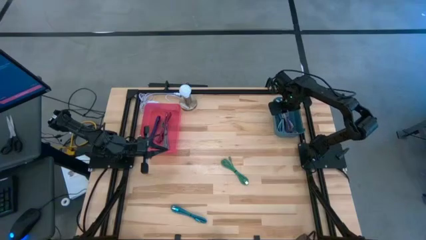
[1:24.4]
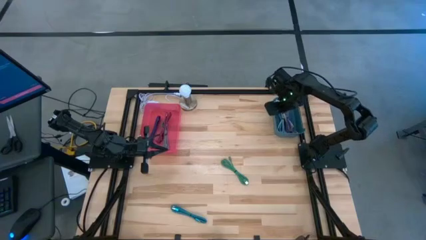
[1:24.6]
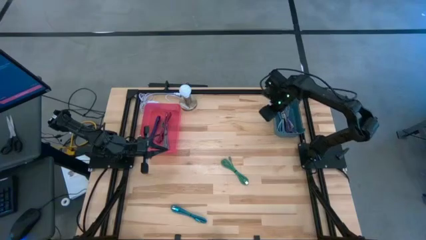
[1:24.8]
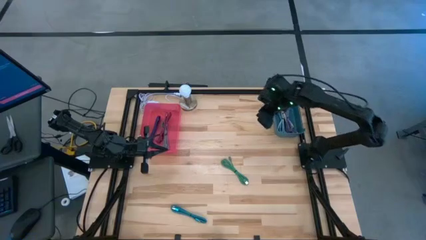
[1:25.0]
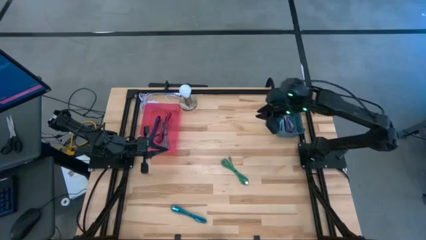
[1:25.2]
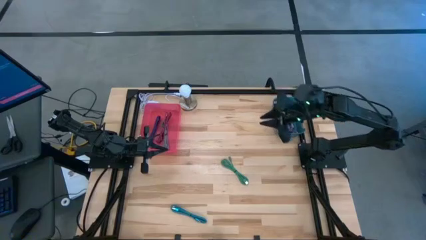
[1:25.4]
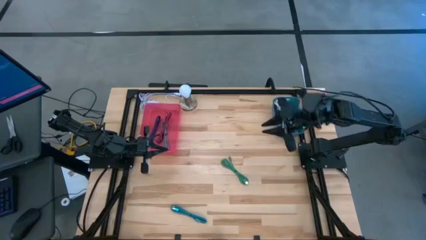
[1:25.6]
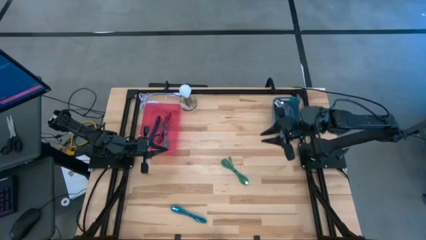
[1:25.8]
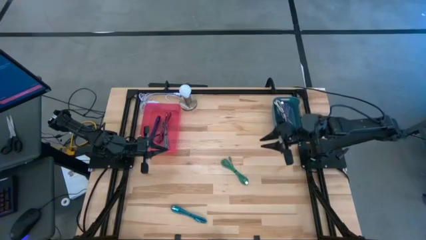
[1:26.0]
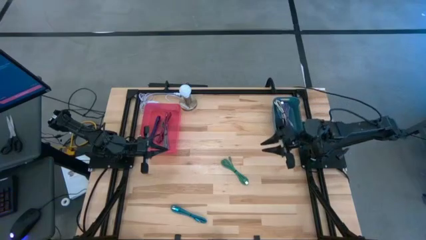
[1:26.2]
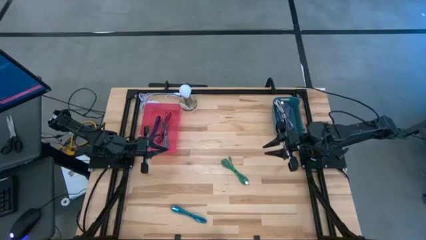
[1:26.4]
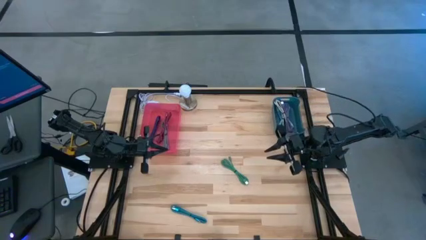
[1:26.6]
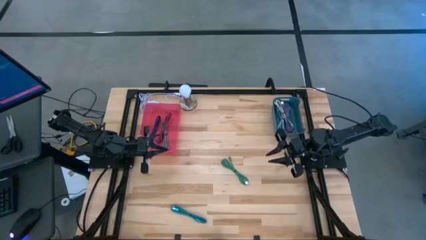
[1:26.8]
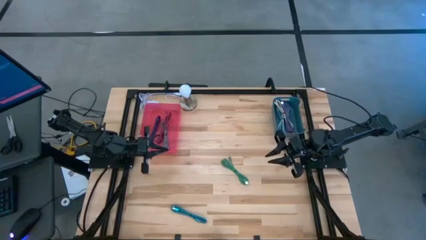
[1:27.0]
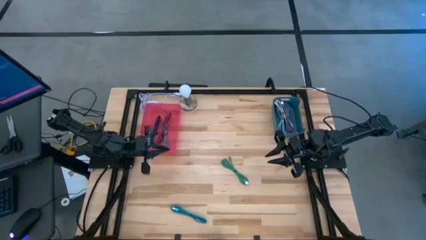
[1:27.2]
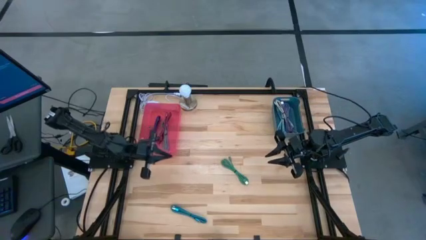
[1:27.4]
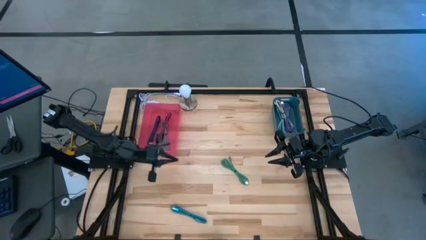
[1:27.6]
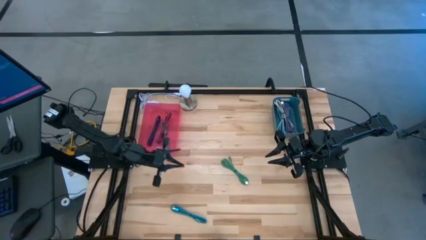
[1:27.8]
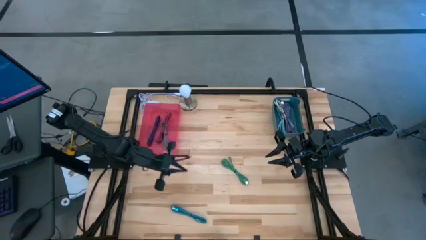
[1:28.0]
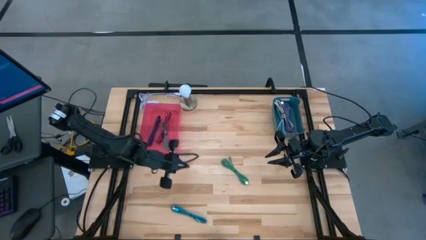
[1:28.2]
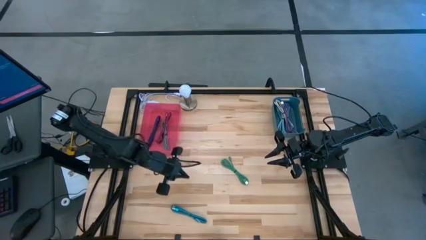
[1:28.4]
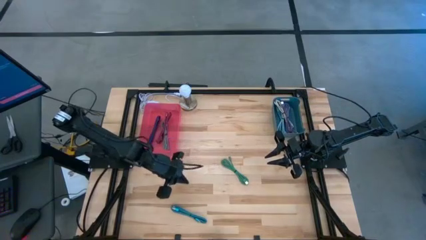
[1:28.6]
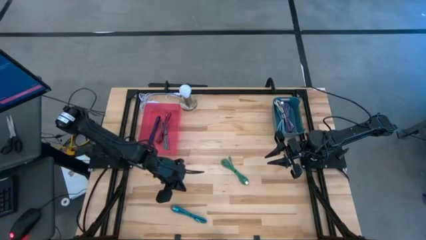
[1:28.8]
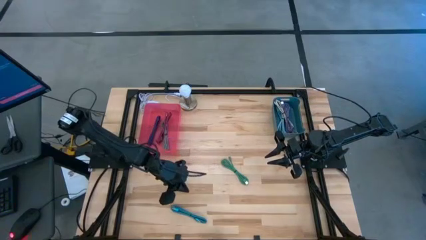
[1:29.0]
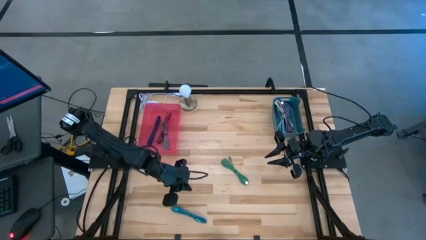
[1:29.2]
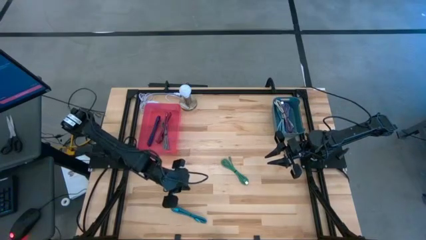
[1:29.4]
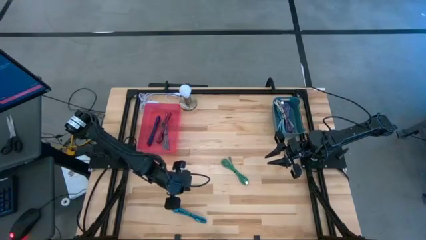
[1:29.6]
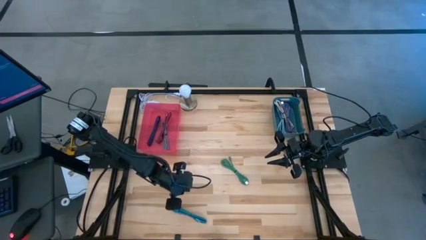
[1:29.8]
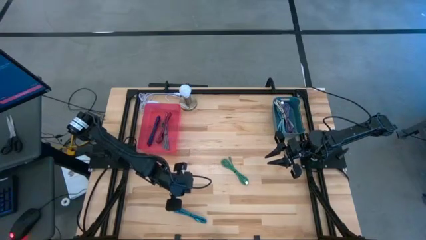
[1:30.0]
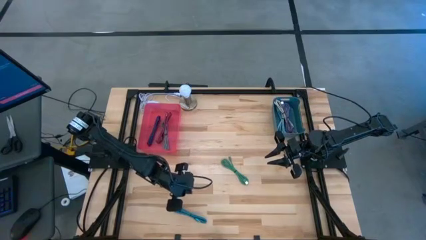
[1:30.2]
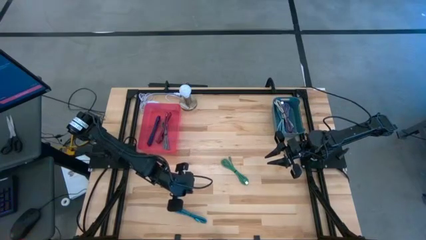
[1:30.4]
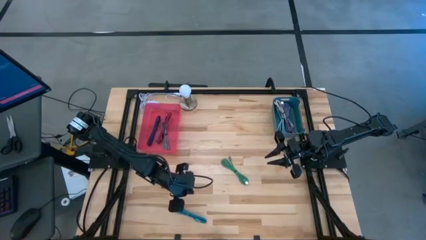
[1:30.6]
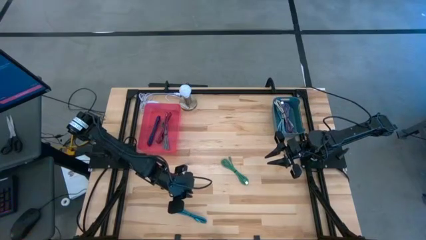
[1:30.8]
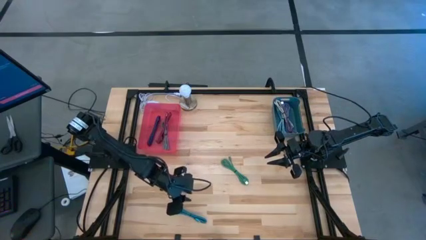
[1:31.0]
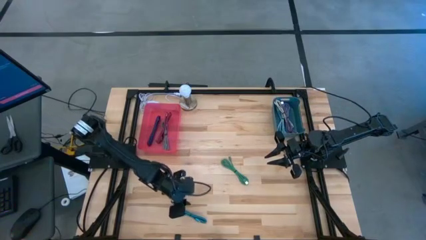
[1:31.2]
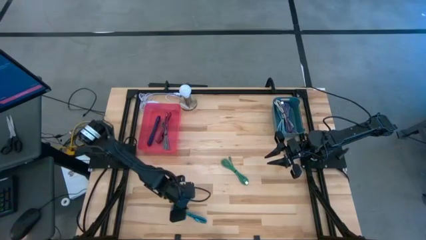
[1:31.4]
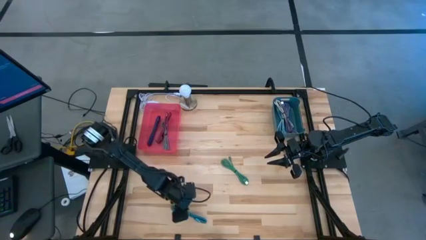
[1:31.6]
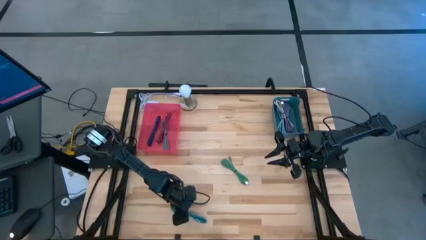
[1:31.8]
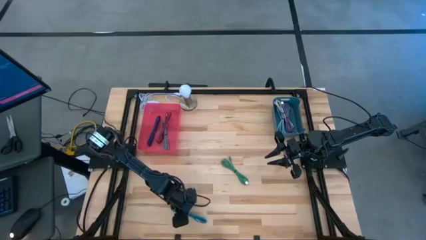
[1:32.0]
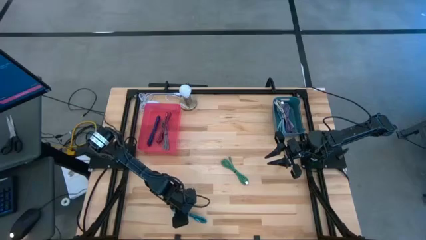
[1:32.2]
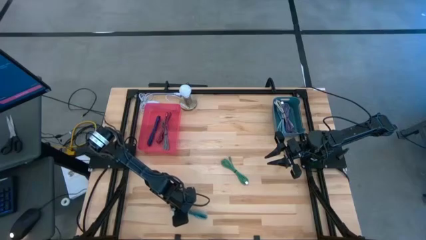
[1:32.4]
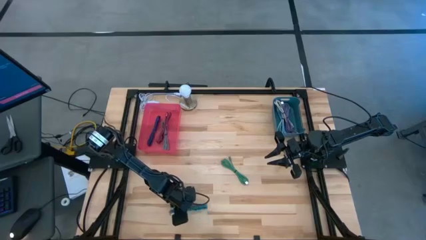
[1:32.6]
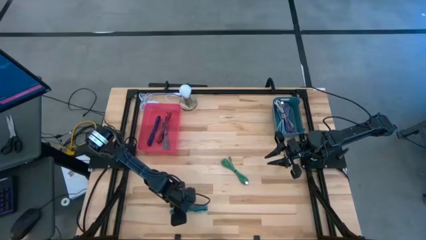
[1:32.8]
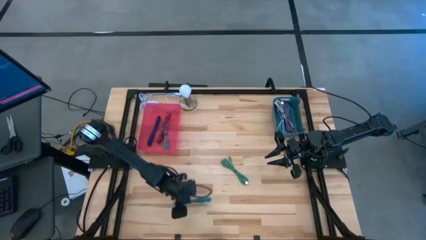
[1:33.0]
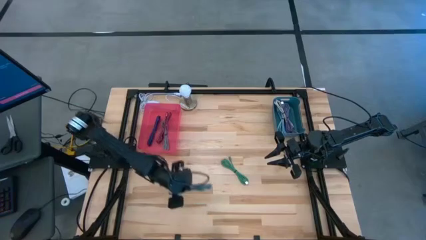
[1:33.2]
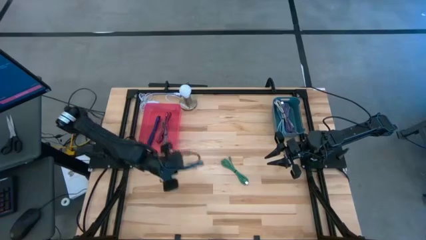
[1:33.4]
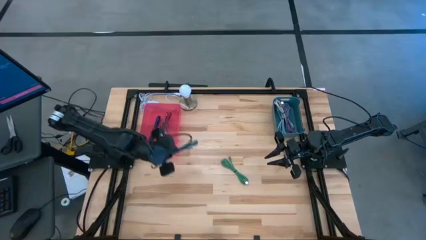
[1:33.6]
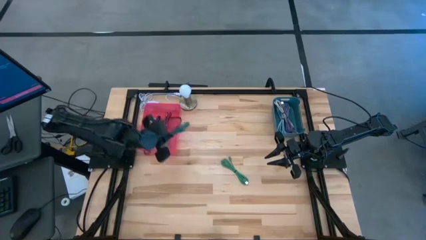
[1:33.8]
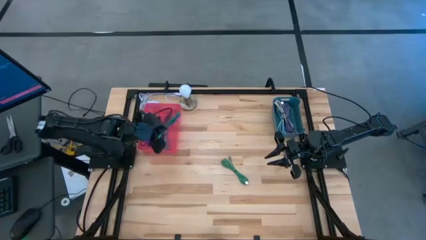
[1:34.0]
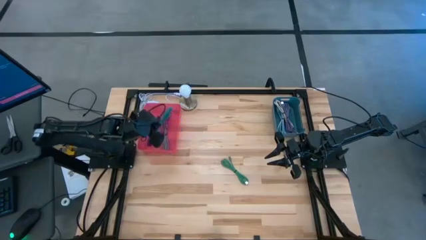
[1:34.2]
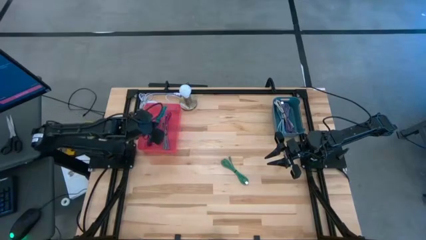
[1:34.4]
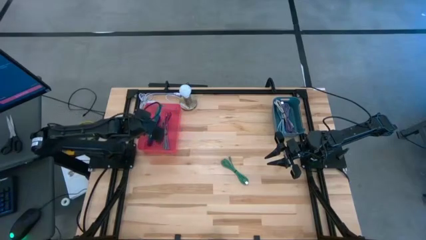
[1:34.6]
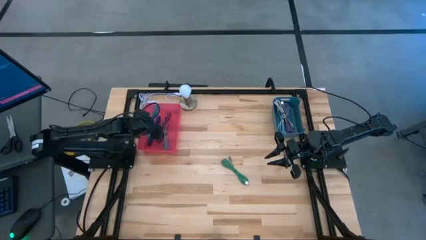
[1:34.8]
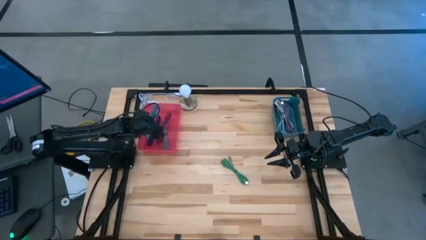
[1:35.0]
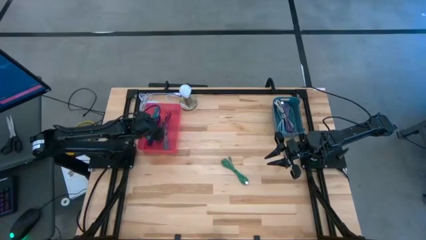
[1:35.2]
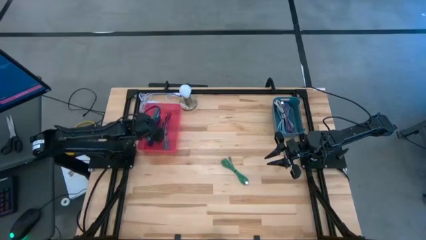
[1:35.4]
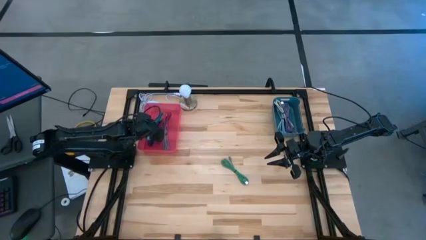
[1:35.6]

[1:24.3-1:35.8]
Task: Pick & Place USB Port
Put the blue patterned charger cable into the pink bin

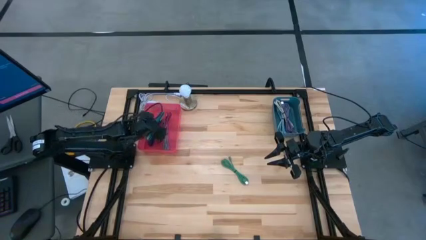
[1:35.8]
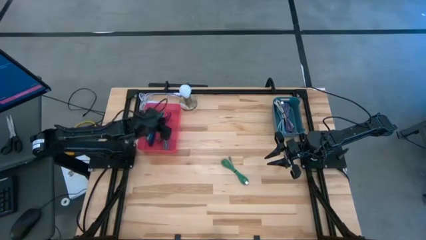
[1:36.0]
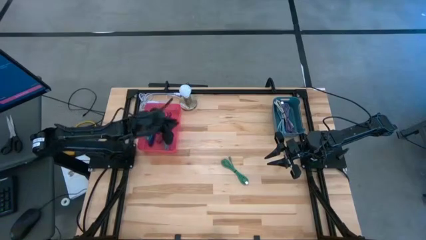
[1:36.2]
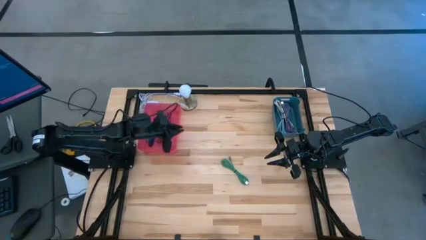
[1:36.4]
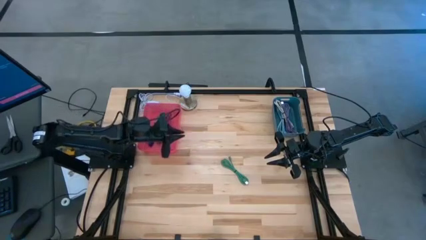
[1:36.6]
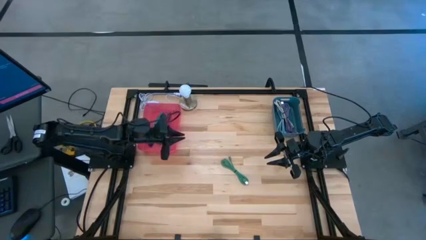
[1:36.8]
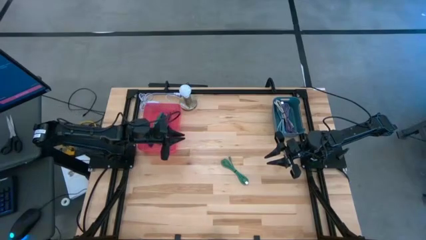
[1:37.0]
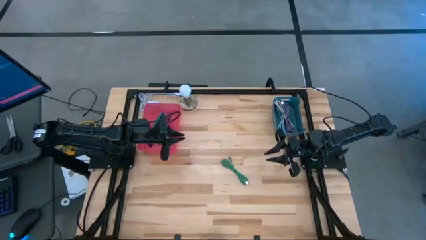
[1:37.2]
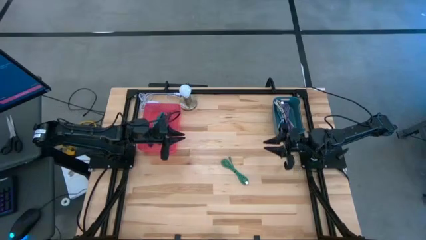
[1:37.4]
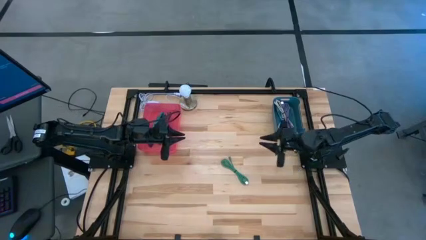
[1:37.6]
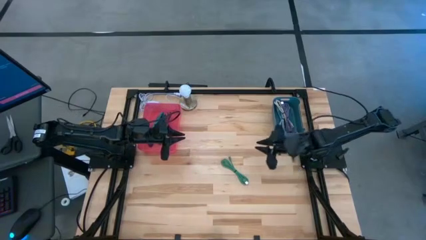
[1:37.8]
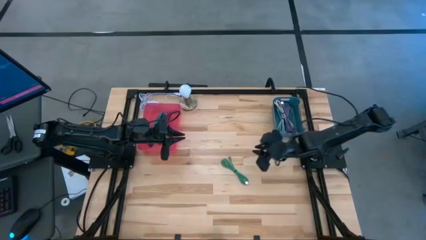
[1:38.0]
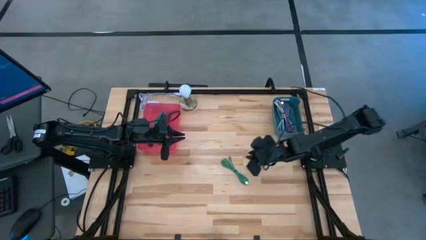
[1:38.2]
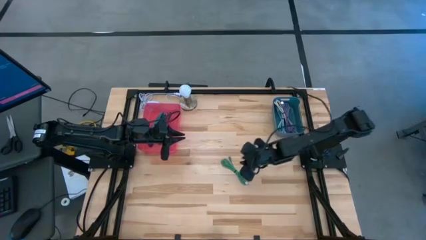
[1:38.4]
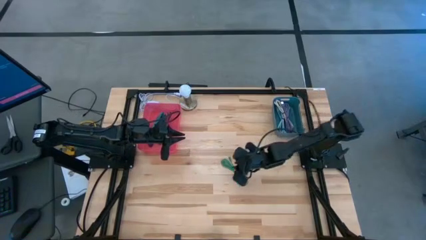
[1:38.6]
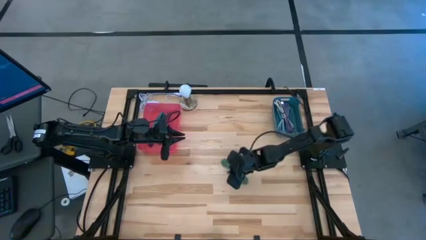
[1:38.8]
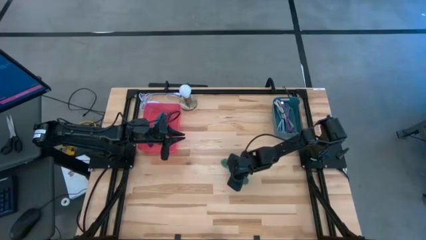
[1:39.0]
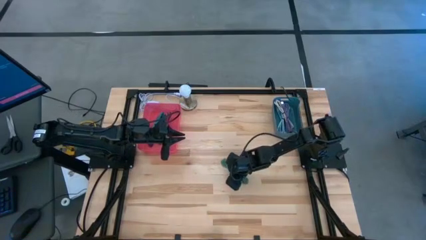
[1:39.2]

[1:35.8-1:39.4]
Put the green charger cable into the blue bin

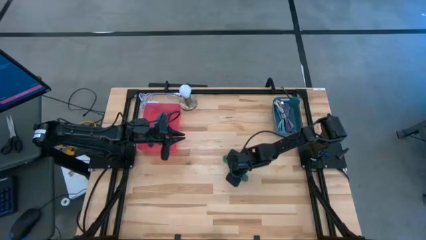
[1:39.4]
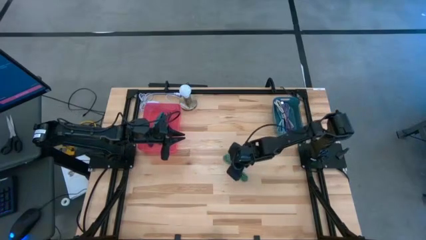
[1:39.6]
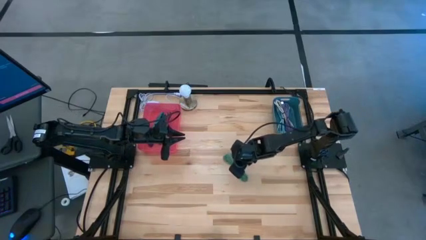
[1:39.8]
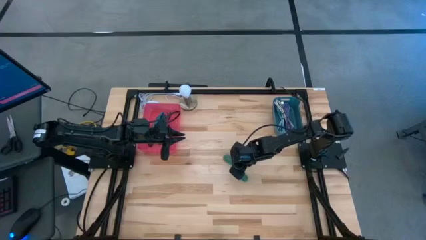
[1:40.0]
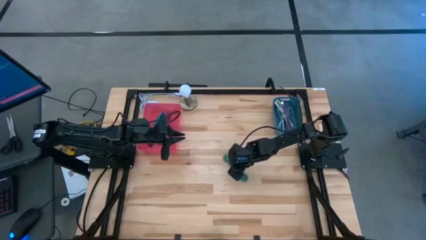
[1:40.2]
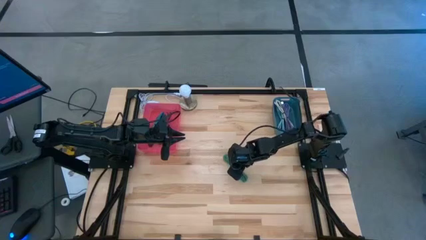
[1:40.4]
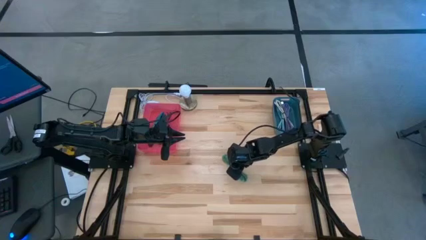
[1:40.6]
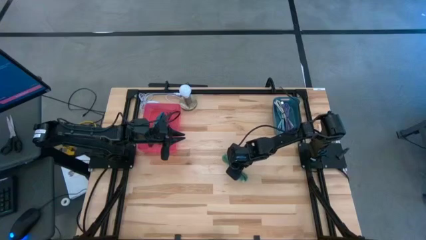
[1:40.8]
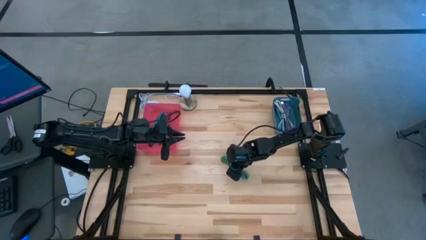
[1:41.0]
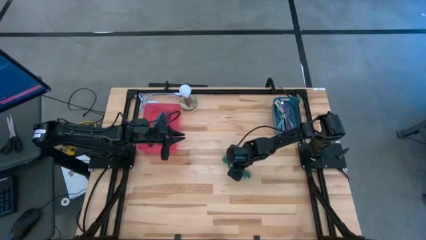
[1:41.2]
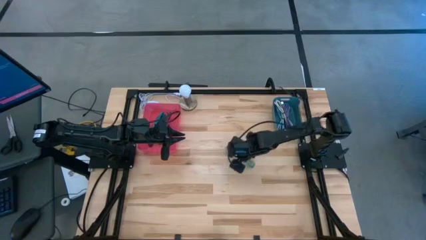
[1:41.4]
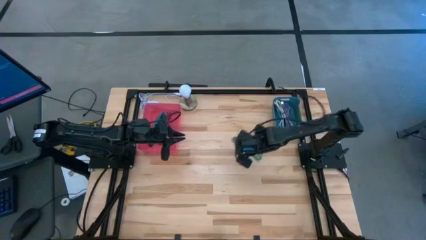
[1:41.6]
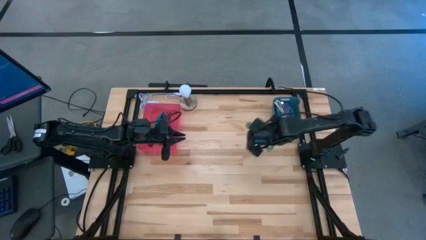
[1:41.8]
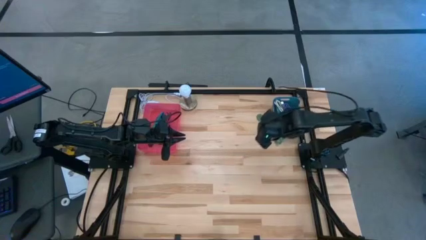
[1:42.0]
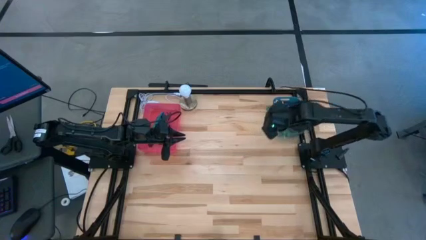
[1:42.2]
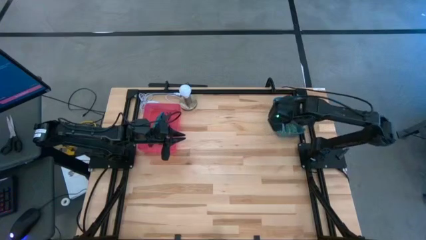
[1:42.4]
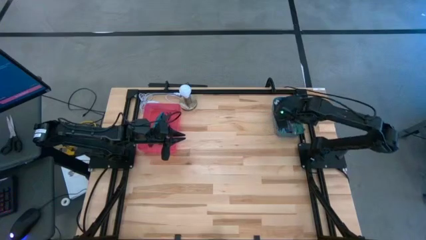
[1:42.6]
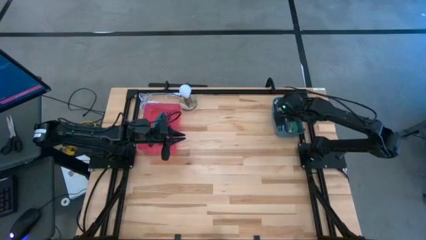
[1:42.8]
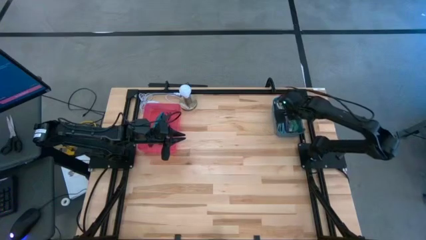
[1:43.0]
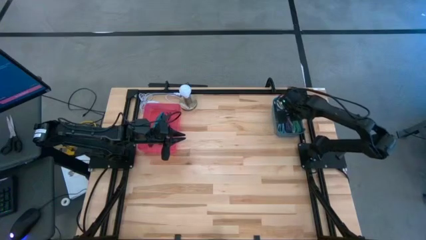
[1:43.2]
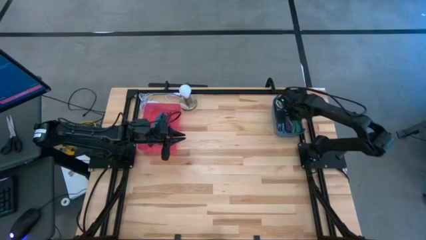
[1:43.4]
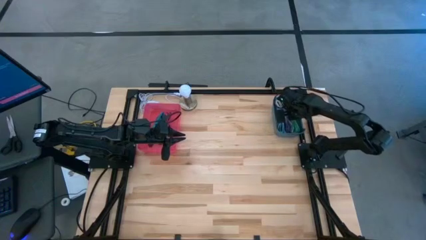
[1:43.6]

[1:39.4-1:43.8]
Put the green charger cable into the blue bin
